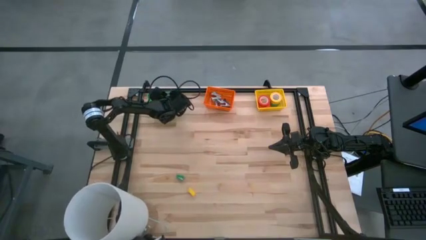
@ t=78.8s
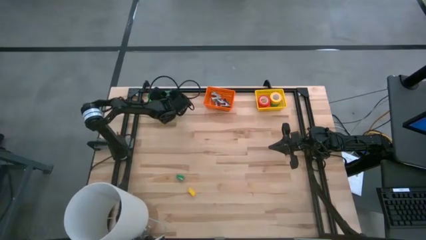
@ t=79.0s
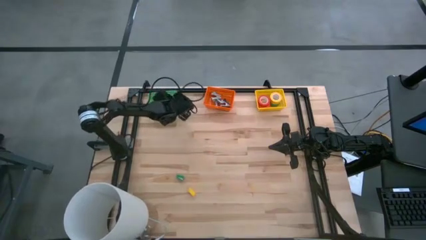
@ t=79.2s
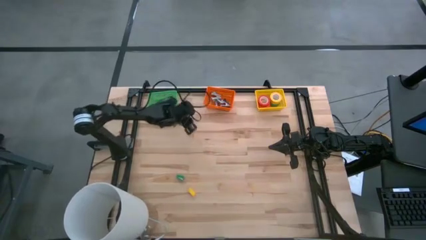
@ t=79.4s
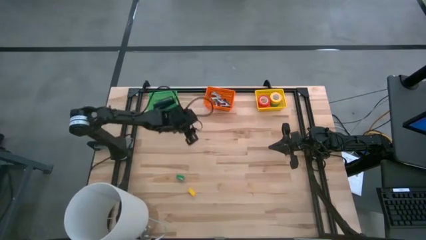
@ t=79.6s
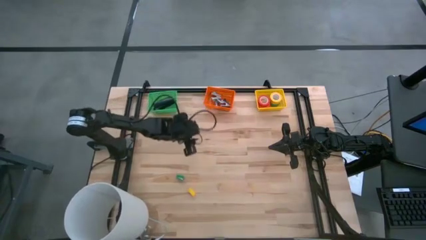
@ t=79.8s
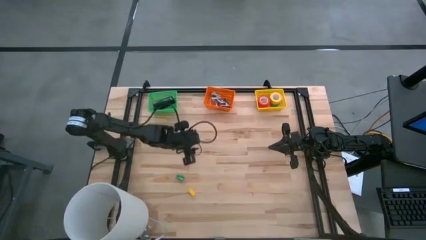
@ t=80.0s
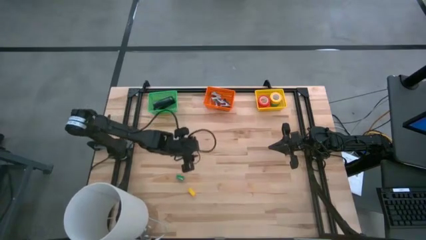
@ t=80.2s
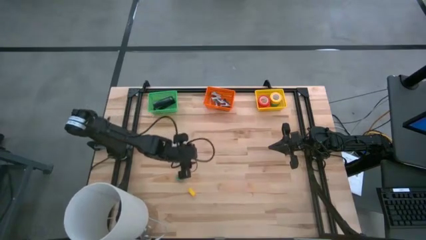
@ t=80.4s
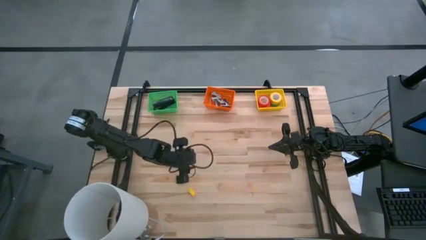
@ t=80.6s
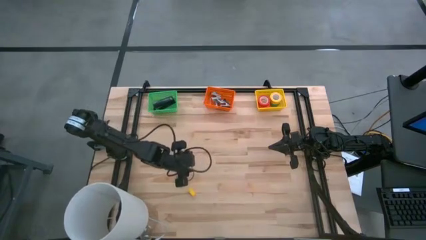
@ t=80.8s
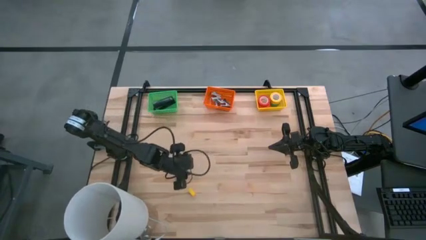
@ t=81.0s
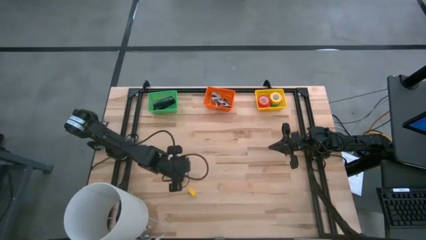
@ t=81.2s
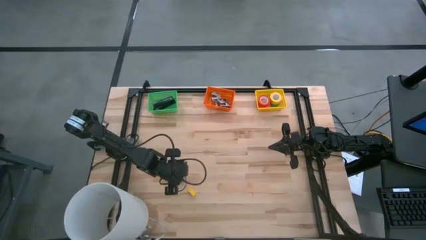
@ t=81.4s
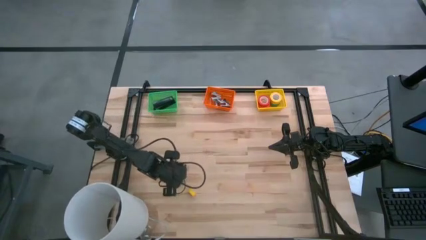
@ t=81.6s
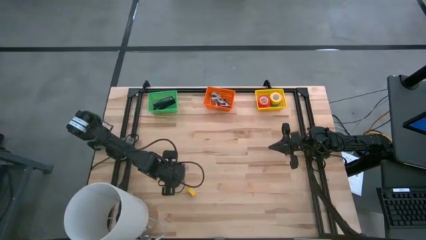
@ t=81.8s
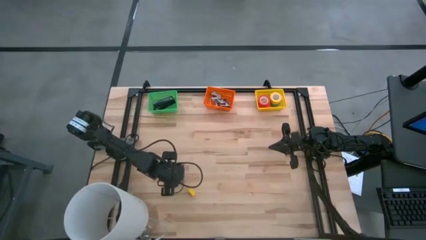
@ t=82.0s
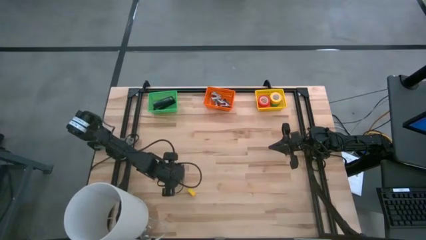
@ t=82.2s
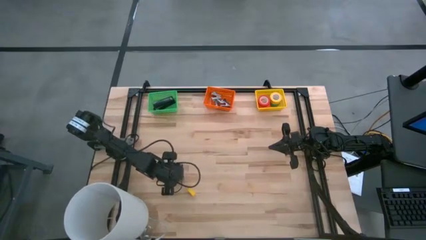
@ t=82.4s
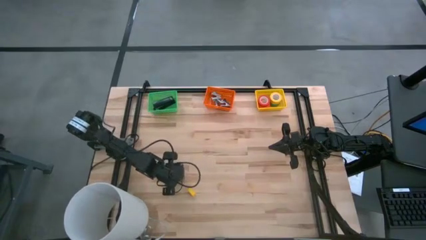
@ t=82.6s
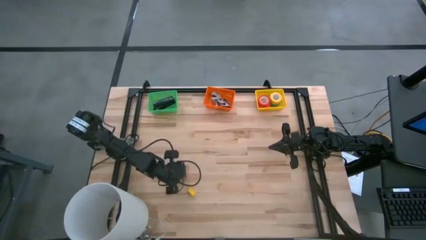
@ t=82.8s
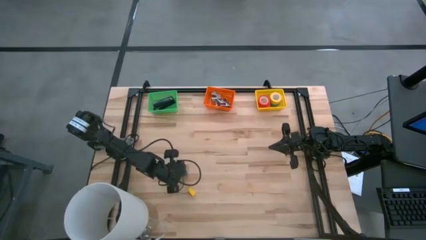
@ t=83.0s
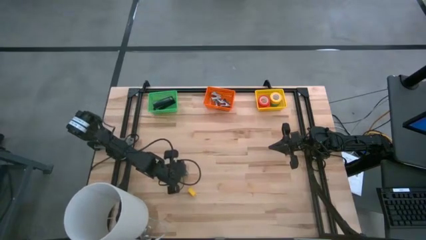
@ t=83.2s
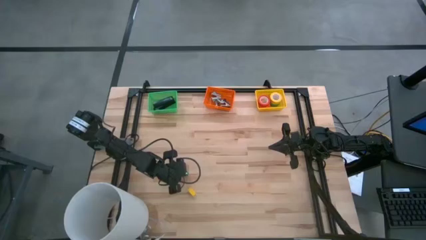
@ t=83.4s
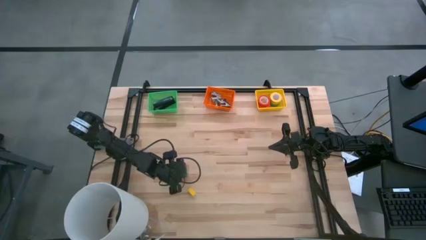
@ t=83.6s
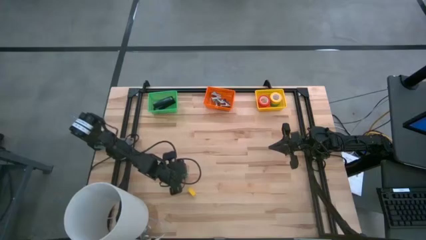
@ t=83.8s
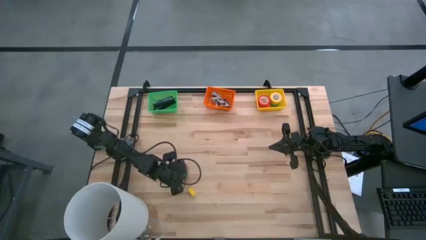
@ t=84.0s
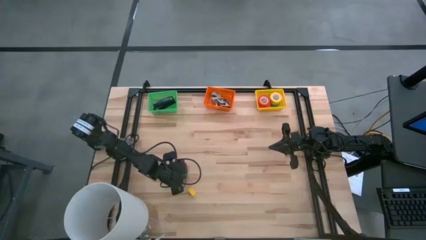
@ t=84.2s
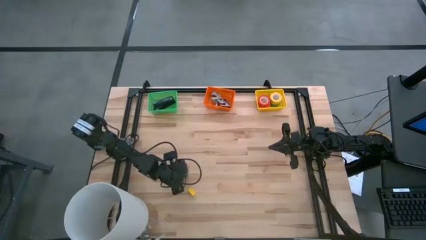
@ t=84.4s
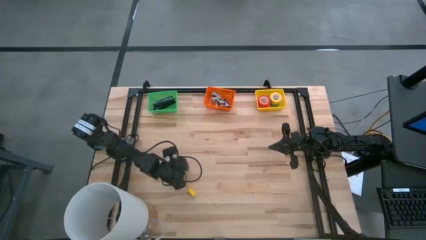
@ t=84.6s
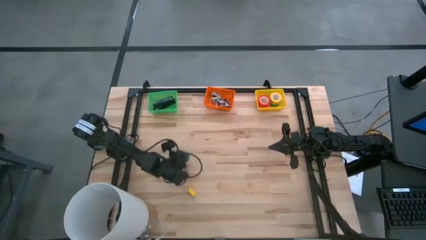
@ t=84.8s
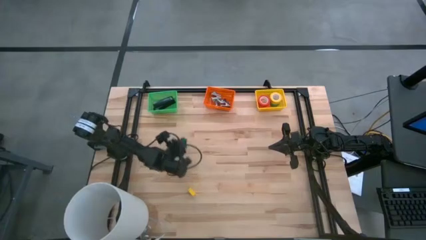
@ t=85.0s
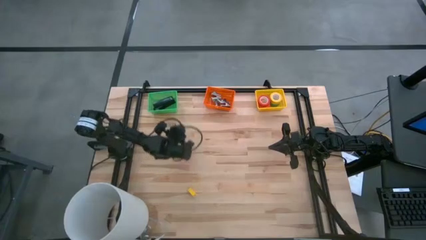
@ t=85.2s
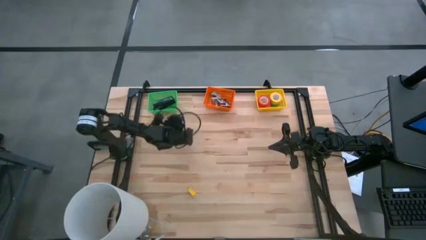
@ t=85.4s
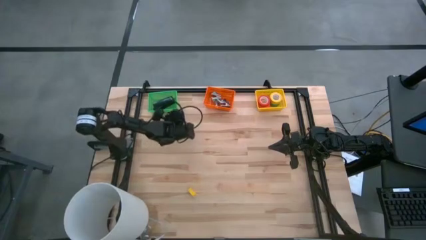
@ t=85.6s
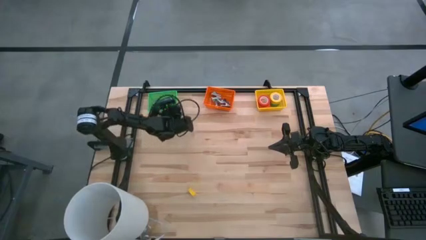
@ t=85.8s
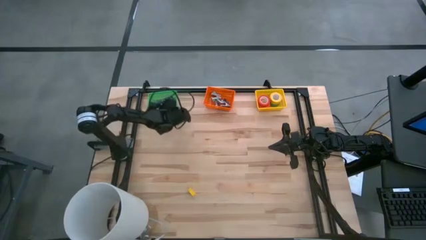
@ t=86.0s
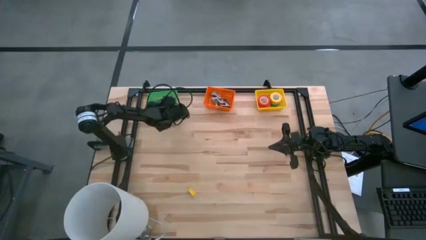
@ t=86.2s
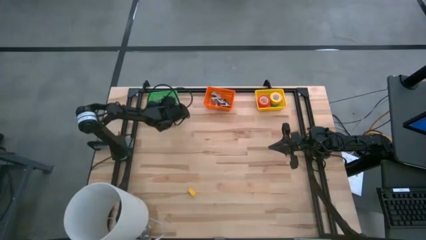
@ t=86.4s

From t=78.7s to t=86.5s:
Task: Pick and place Stapler, Stapler remover, tape
Put the green stapler into the green bin

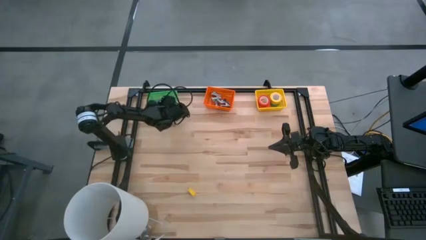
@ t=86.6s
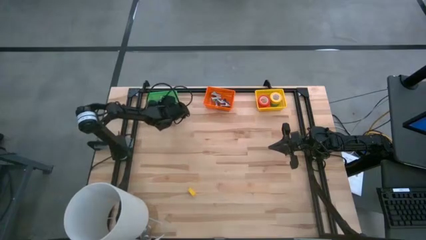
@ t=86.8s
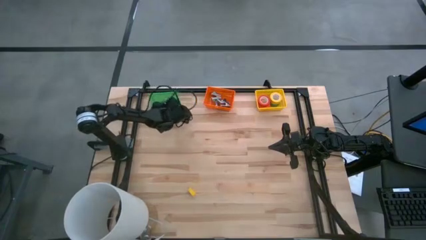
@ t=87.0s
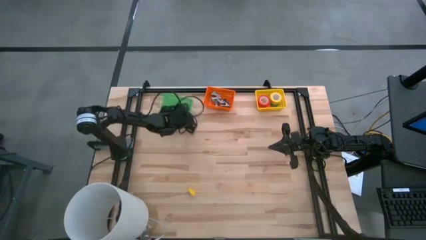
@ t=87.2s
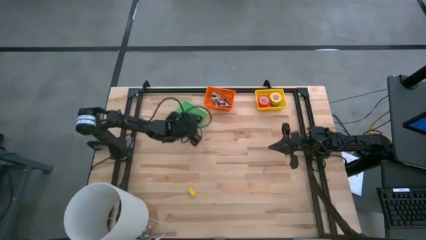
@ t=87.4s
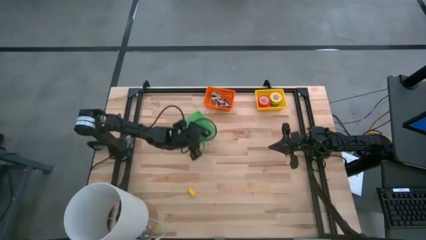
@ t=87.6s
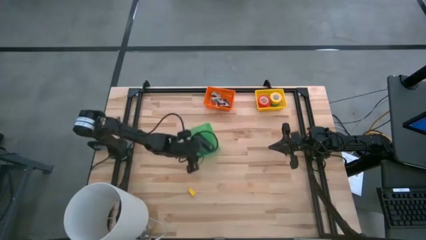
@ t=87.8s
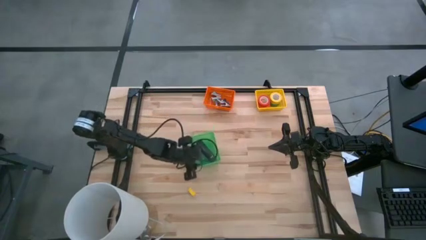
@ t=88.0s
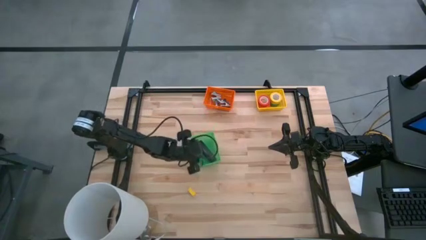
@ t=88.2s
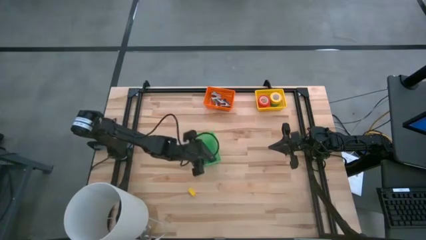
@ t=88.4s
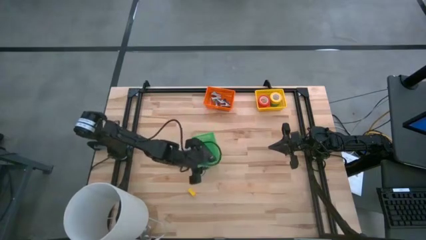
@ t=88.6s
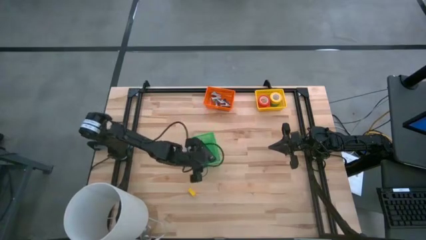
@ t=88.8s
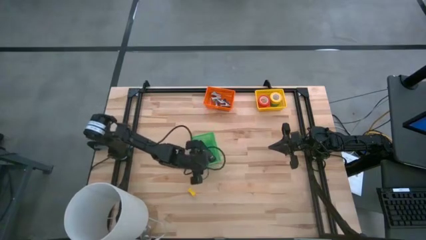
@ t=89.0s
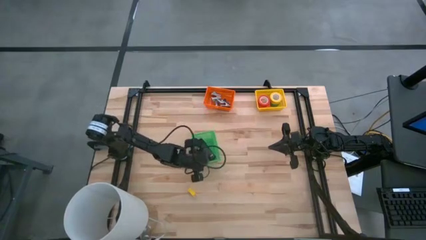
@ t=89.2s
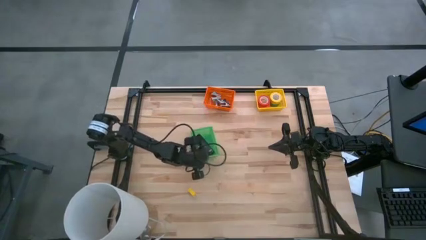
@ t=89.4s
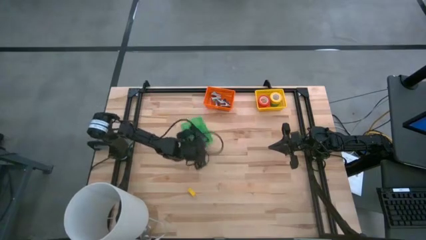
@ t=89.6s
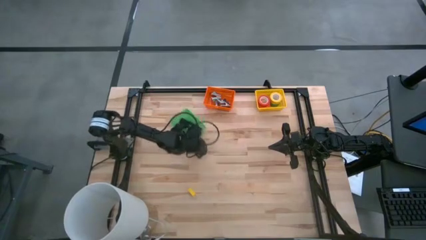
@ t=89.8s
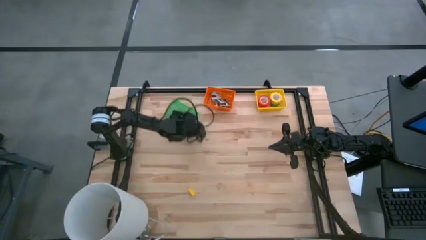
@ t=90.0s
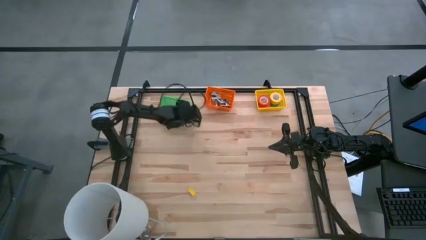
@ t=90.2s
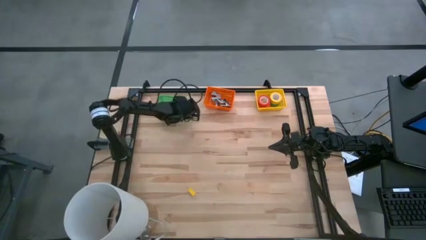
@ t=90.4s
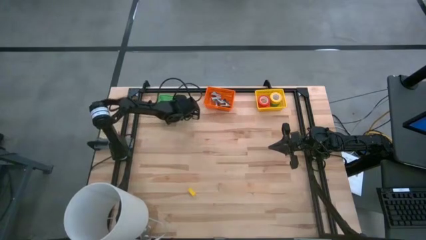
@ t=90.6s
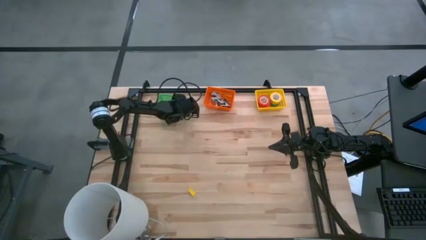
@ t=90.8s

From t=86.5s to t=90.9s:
Adjust the green bin

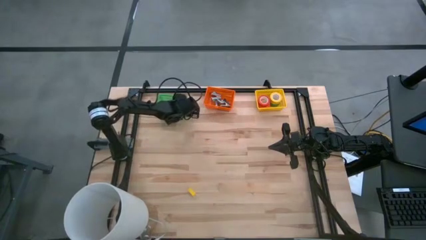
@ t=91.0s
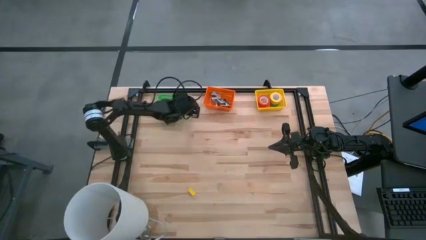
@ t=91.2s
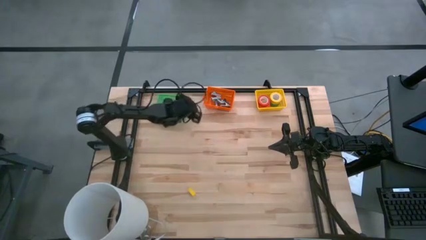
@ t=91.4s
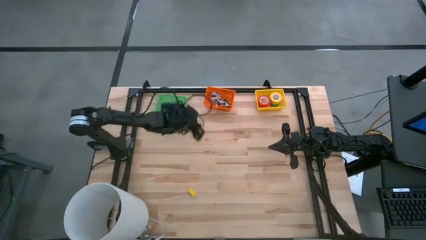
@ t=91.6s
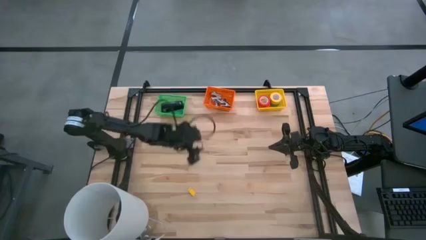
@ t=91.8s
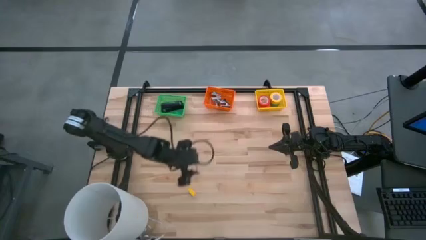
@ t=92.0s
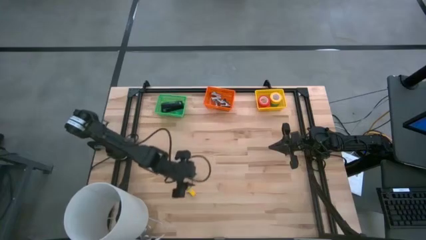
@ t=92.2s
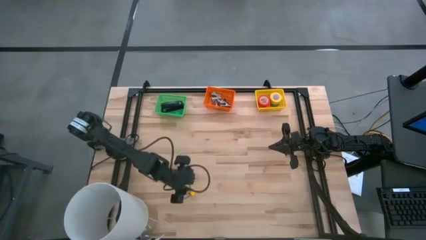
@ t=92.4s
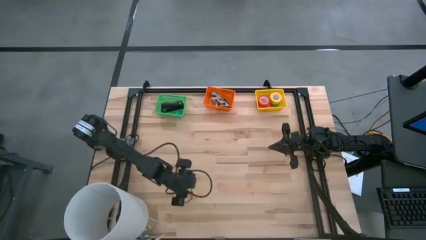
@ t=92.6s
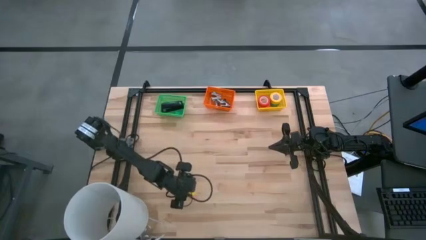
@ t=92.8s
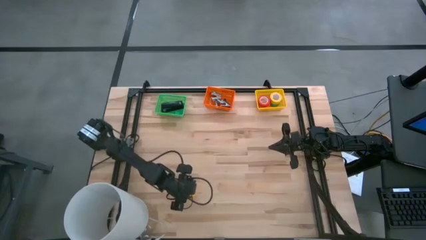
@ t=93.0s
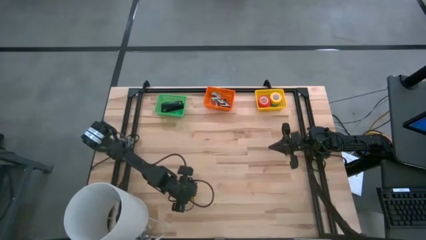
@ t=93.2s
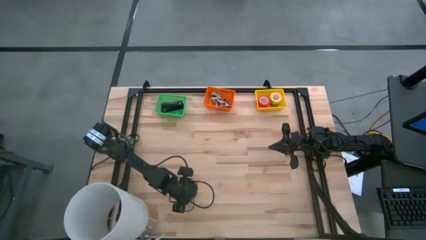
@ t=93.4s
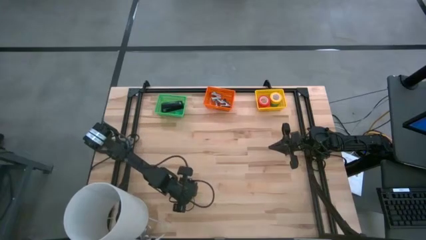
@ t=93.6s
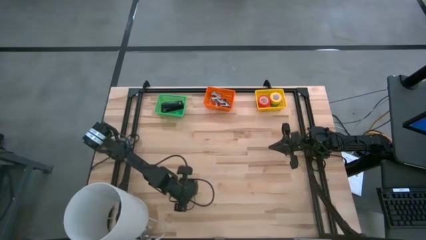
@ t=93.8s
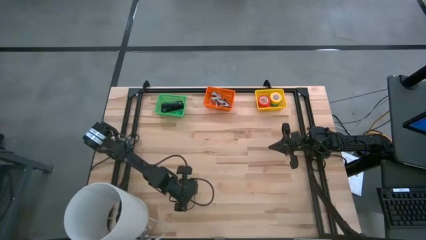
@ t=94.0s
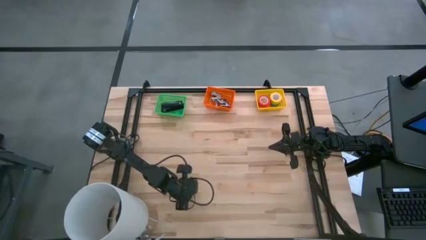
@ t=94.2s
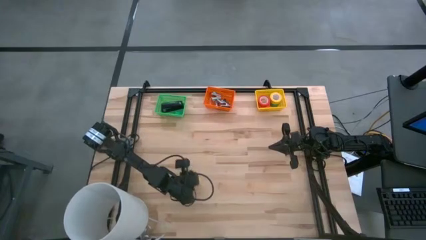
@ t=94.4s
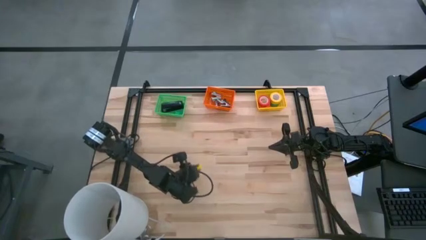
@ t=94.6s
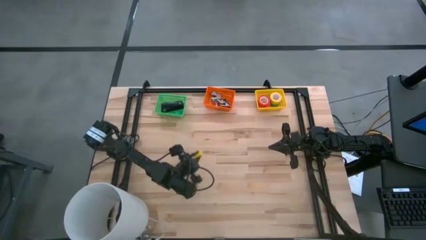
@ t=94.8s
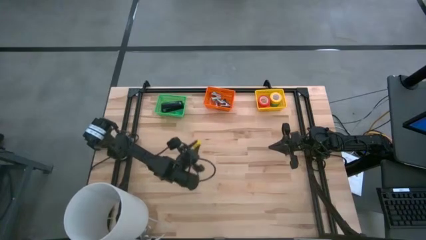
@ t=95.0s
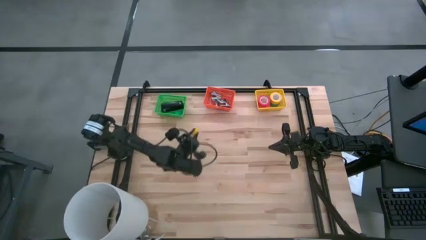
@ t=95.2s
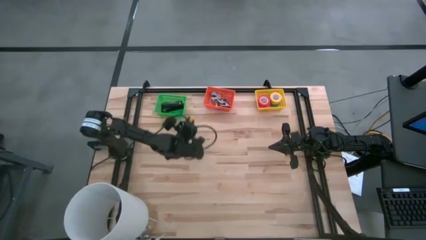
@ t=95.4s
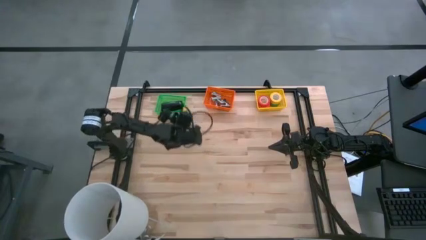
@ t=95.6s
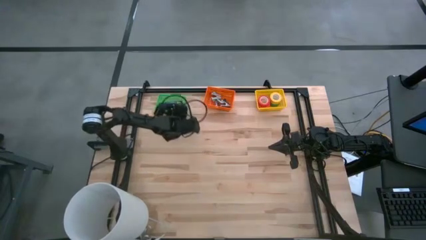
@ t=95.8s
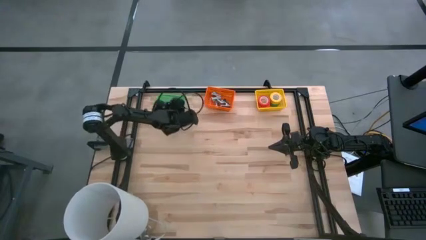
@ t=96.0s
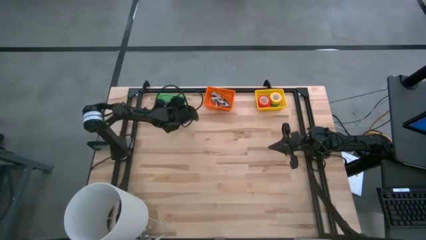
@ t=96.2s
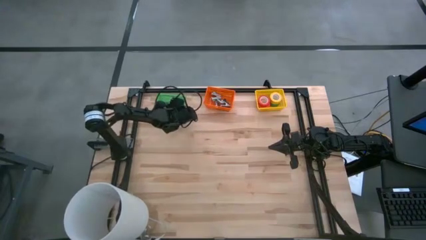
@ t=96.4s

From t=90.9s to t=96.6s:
Put the yellow stapler into the green bin
